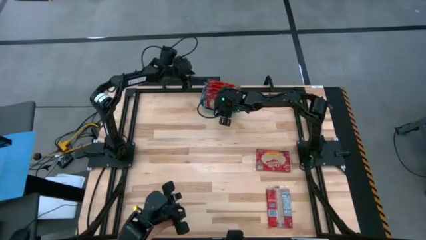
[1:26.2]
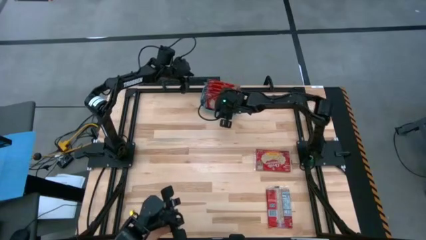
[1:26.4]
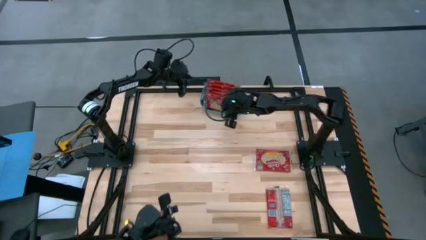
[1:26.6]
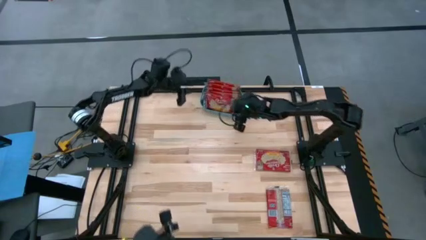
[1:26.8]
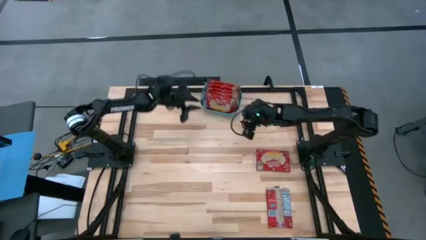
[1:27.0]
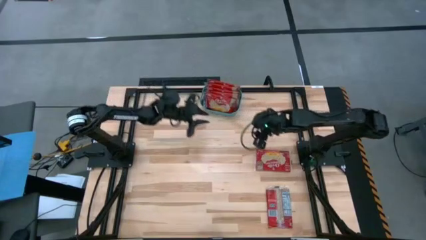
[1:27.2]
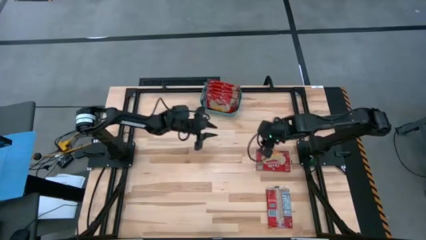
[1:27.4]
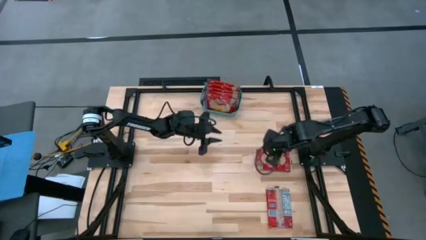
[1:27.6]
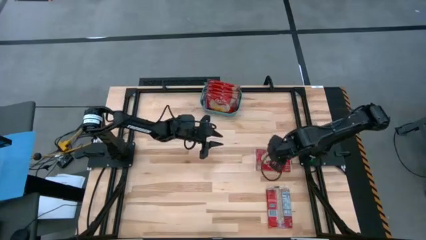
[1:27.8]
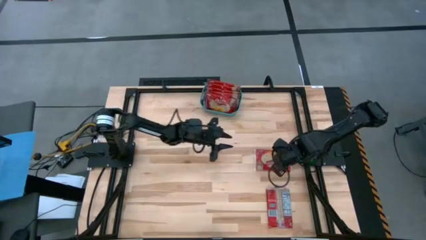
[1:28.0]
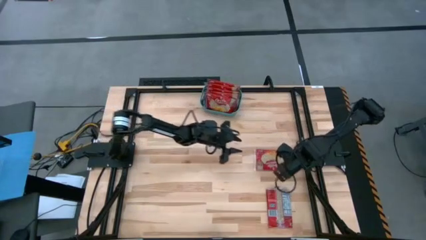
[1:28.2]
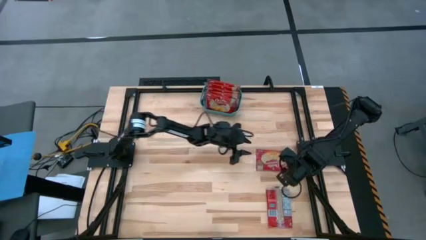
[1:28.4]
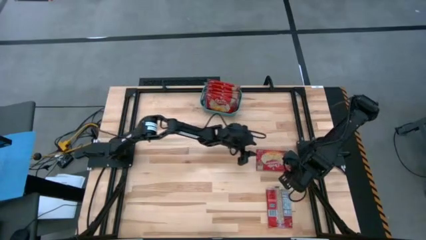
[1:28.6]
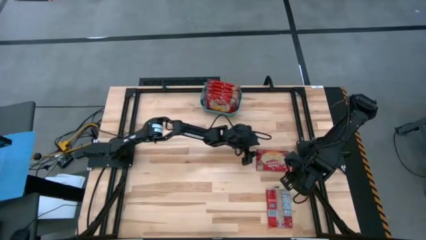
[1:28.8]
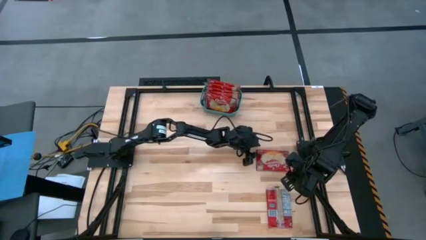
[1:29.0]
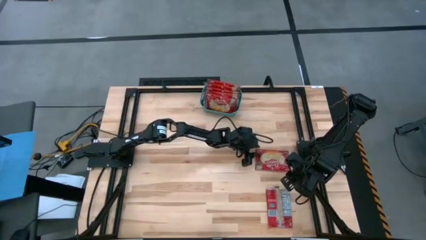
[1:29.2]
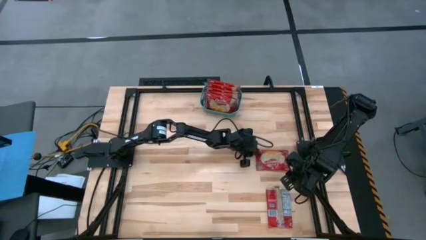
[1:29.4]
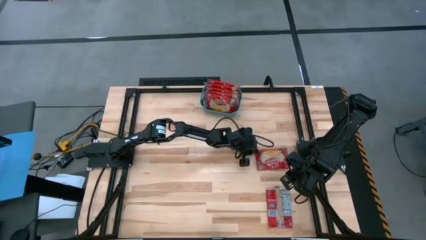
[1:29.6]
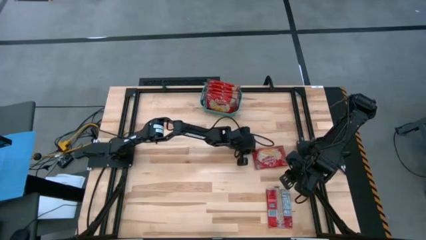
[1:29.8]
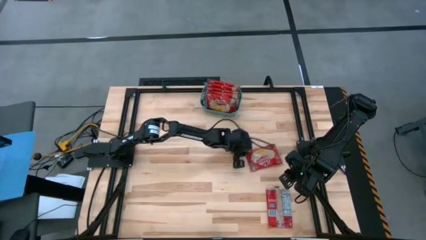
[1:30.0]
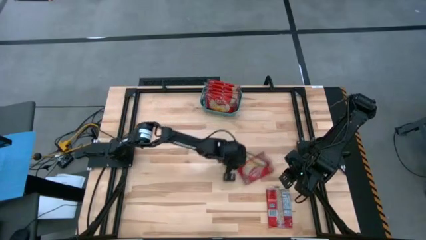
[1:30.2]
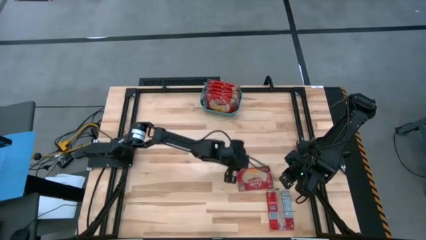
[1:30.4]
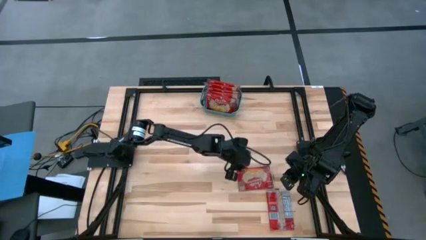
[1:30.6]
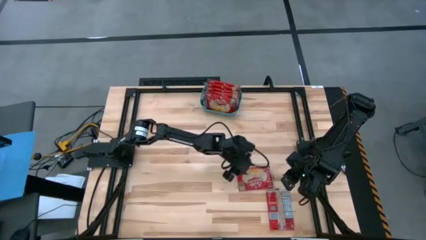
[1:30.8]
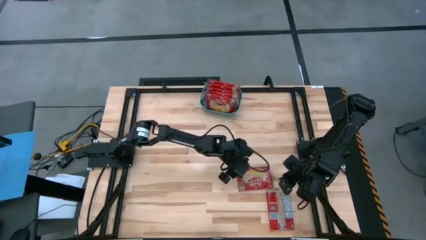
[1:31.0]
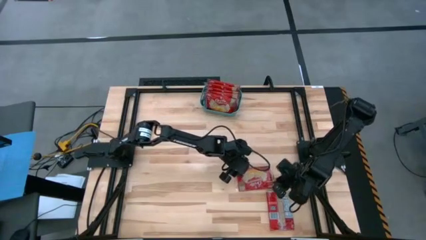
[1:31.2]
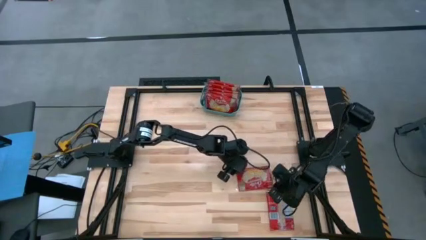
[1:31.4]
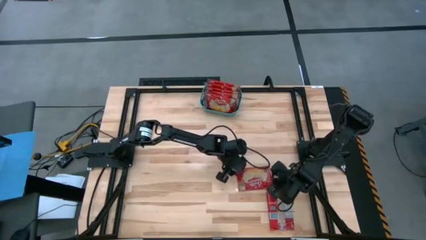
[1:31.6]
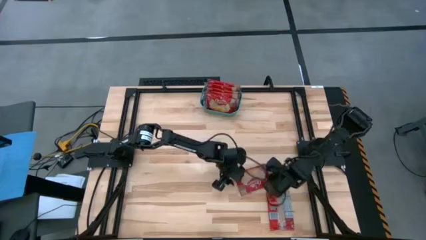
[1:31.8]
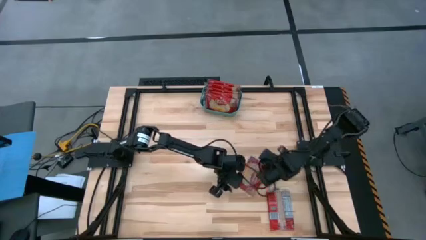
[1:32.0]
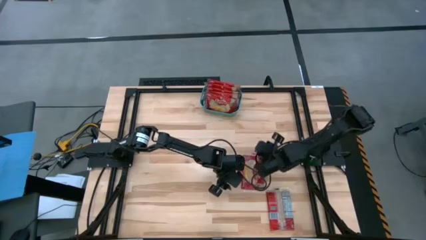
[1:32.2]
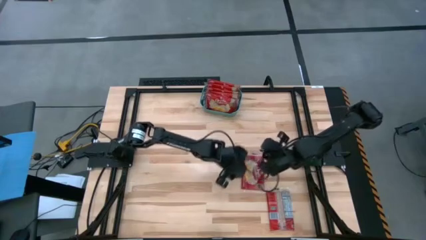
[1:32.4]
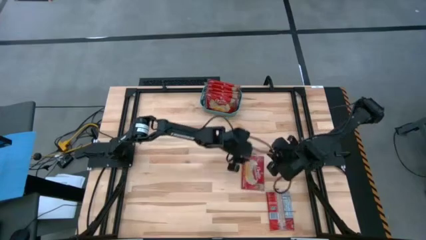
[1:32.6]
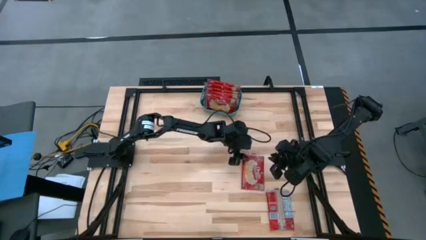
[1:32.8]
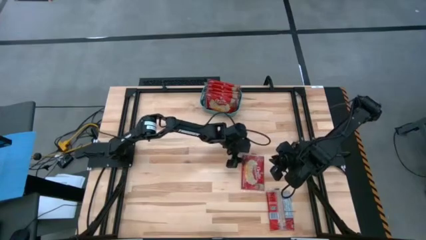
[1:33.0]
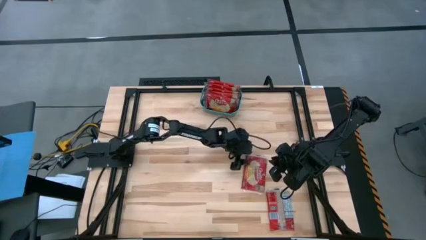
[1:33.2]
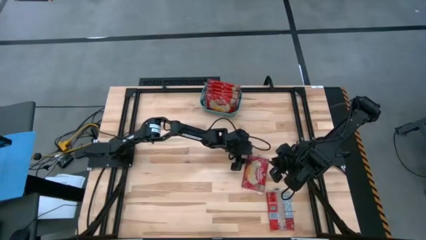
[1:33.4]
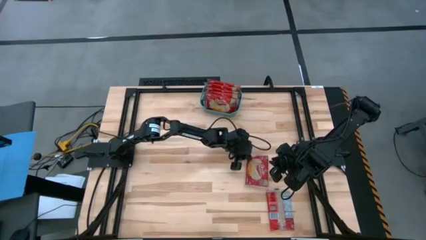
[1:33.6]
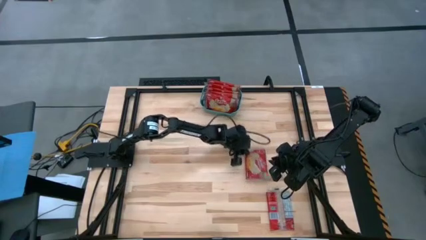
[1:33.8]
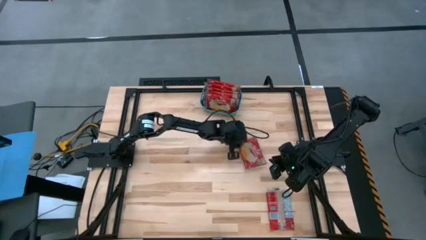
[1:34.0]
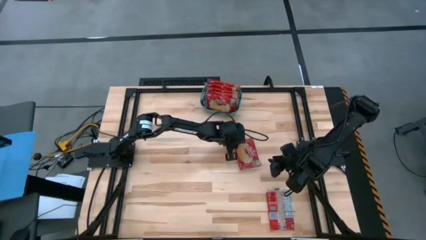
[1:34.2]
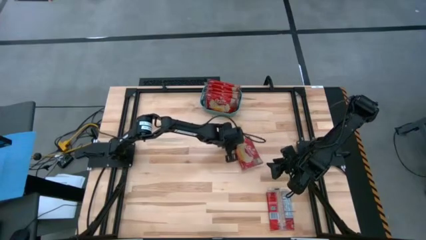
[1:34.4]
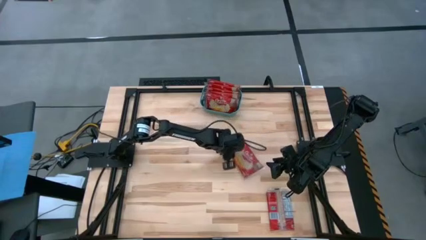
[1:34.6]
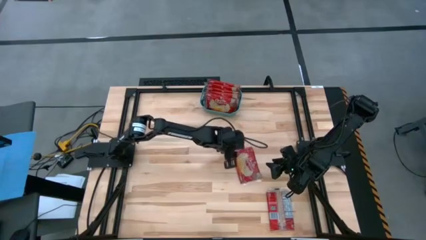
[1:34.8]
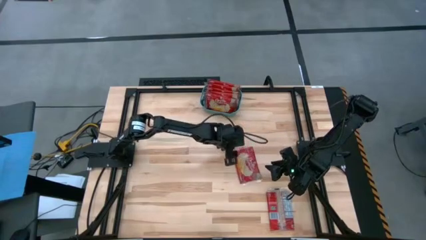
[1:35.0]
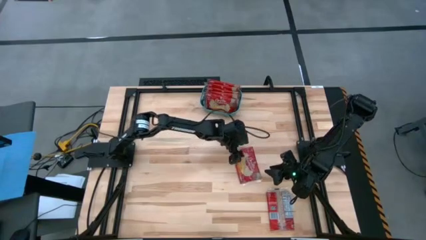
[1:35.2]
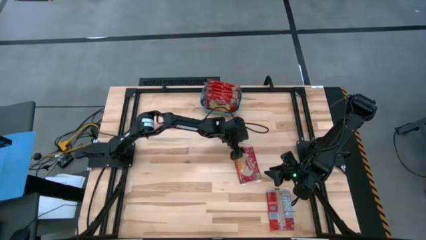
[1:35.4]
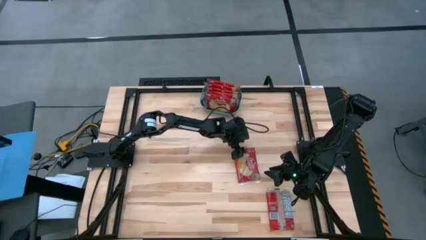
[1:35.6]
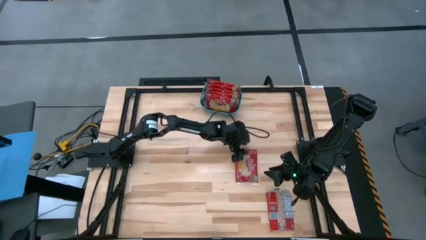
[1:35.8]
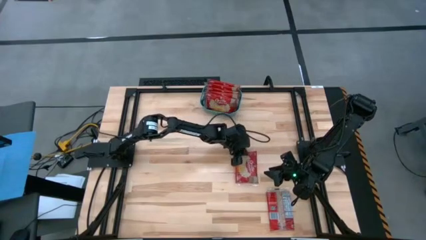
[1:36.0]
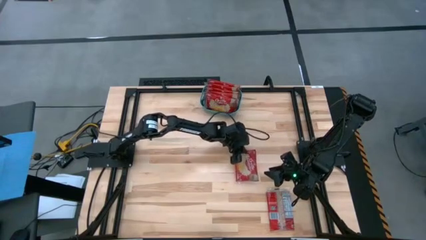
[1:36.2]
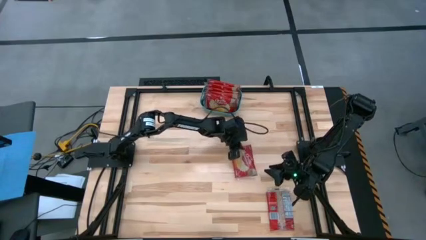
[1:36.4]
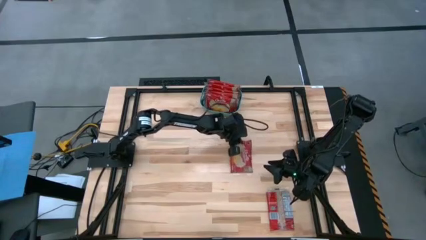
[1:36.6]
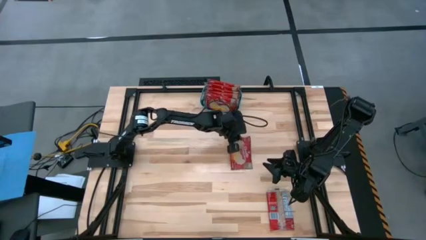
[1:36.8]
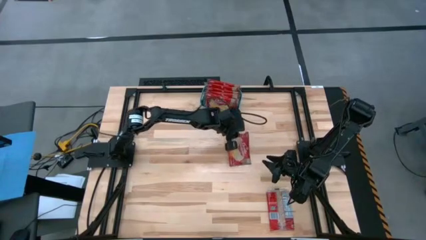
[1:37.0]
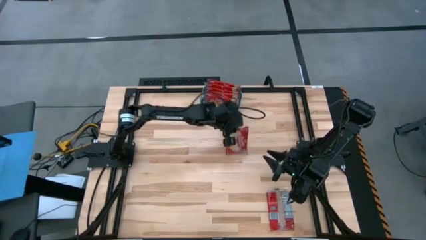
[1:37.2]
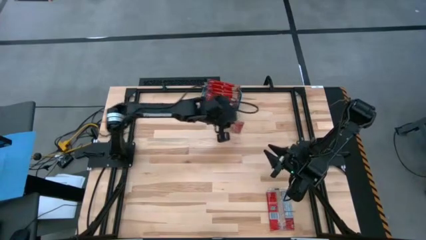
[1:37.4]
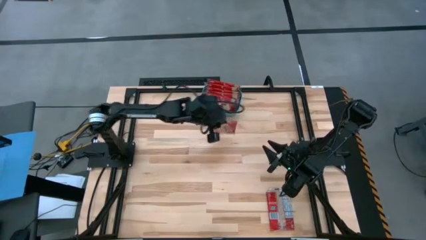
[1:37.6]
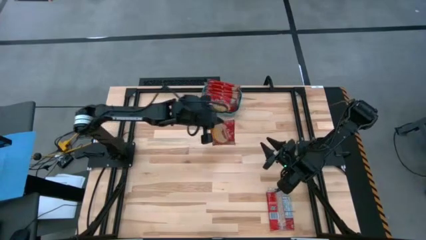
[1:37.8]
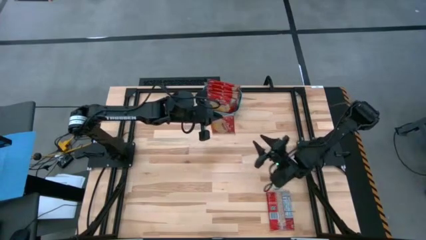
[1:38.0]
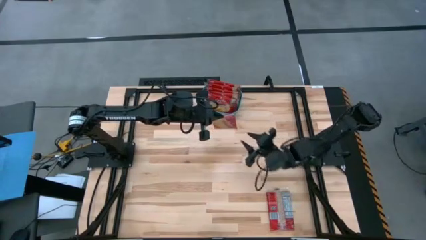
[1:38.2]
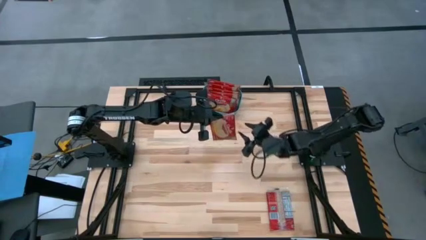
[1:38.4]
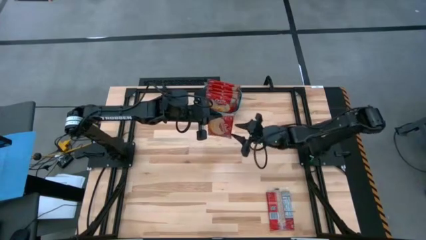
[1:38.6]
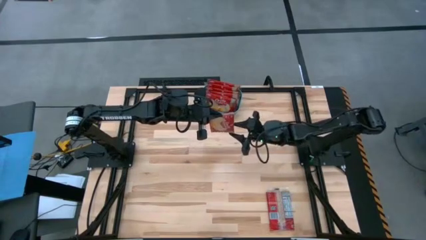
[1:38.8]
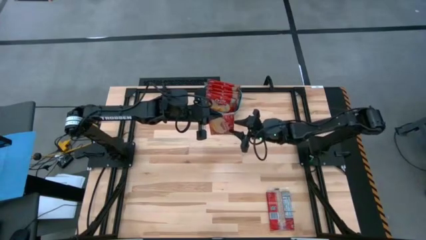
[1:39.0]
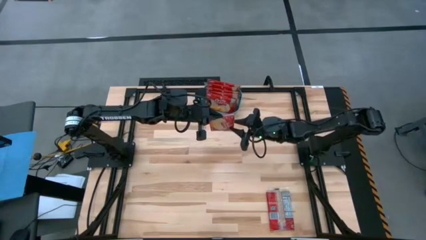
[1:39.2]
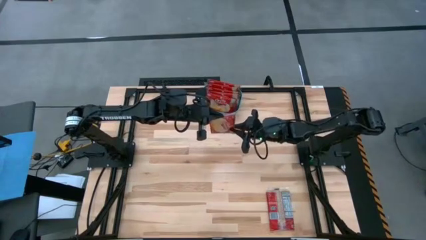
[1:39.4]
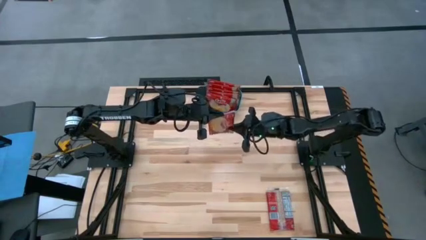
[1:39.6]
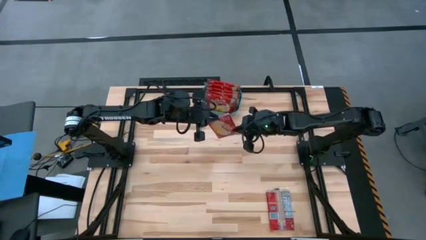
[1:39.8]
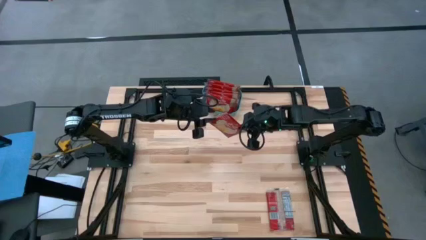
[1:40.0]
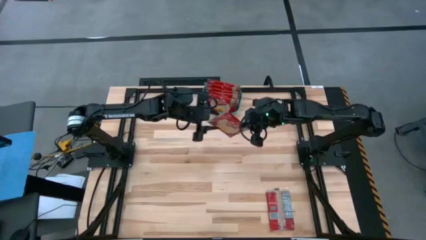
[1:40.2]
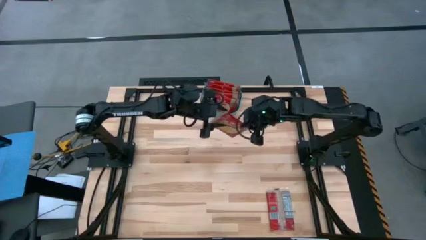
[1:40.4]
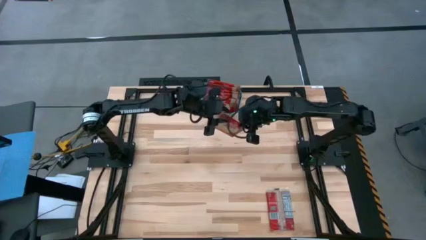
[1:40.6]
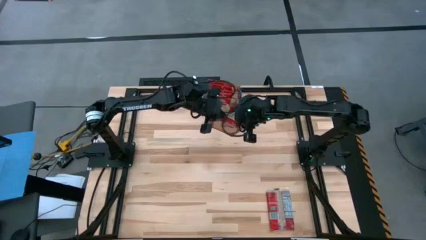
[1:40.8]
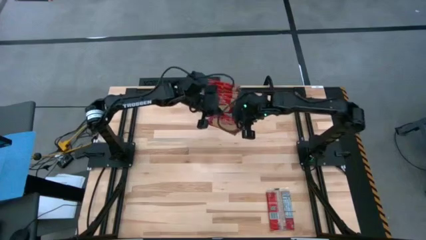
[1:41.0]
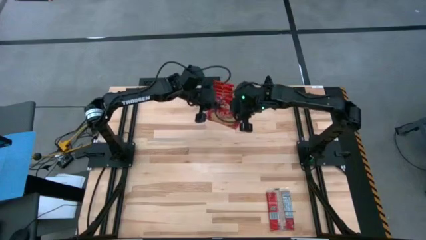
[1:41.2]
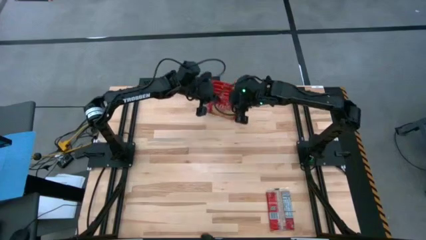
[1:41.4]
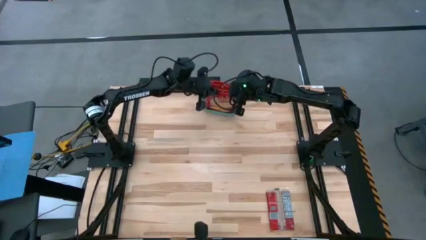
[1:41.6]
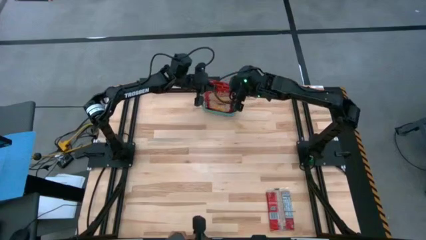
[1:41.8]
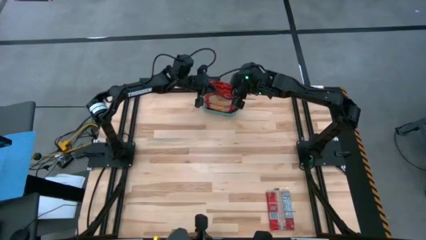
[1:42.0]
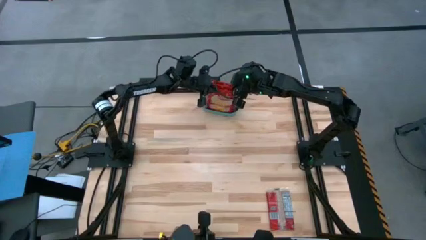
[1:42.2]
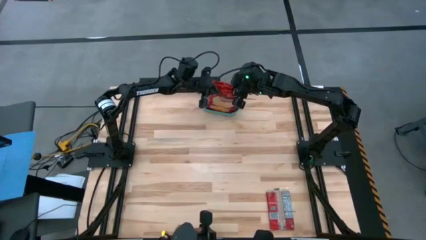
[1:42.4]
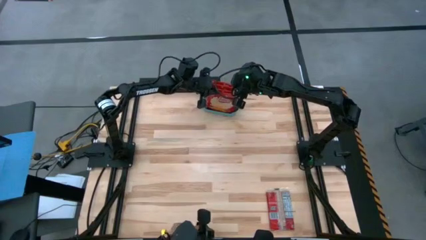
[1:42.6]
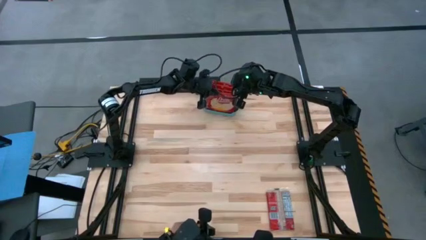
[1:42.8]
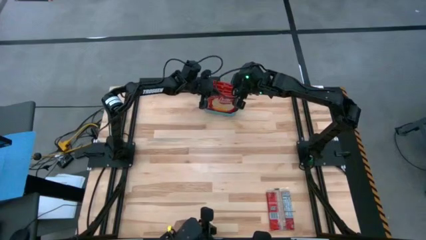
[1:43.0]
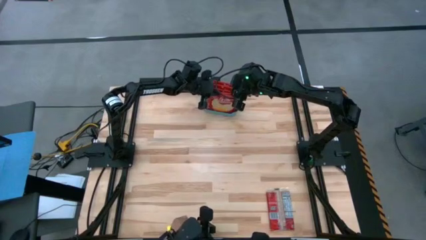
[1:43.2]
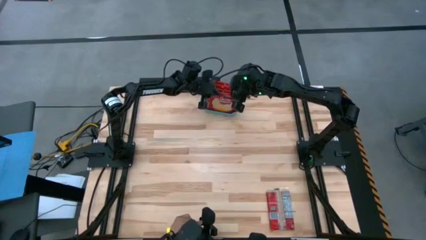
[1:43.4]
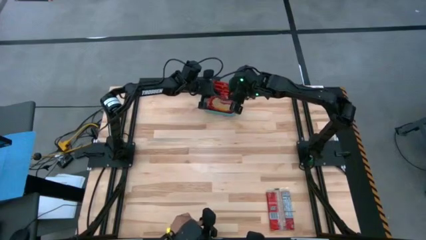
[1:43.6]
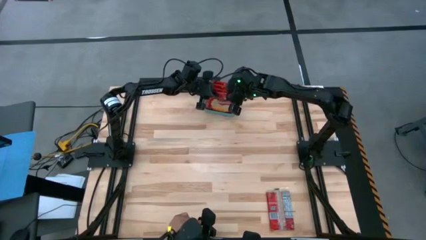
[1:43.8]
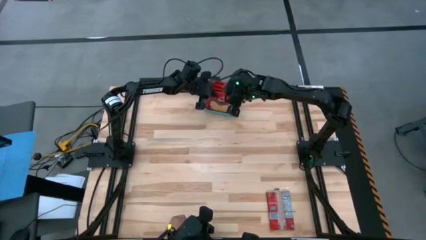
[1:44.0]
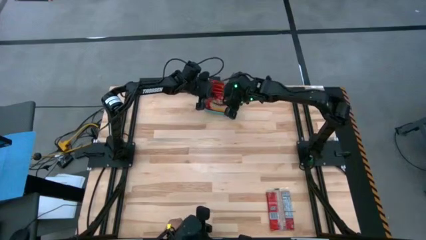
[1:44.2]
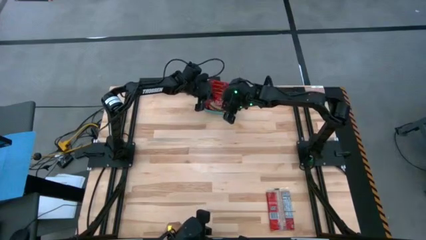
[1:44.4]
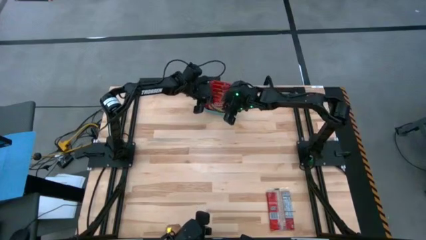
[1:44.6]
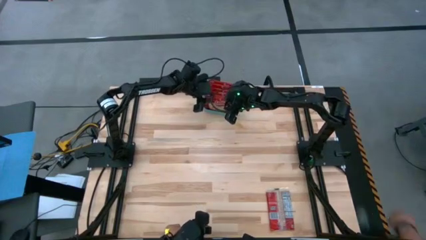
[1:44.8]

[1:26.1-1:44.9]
Task: Sort popcorn bags into baskets
Put the red popcorn bag into the blue bin
